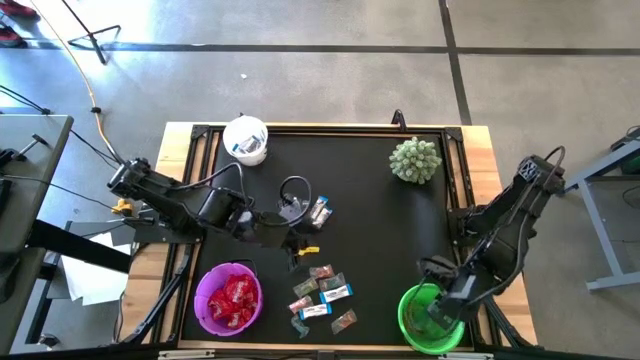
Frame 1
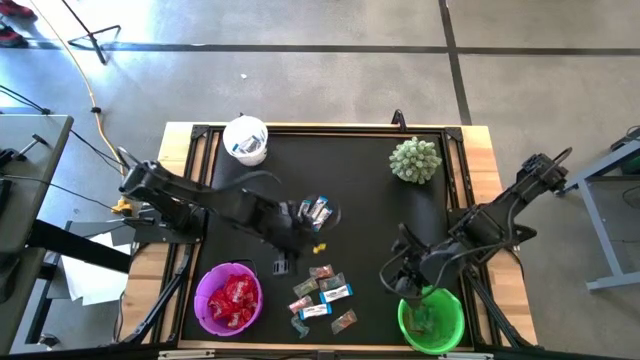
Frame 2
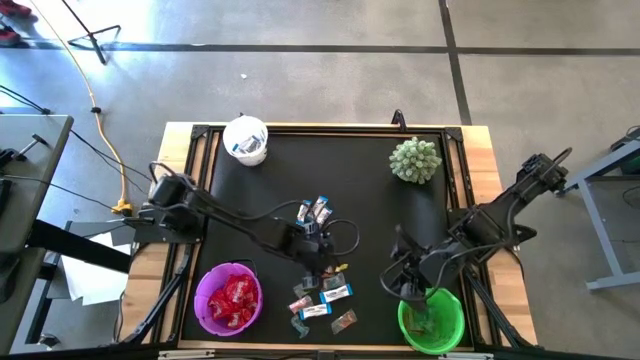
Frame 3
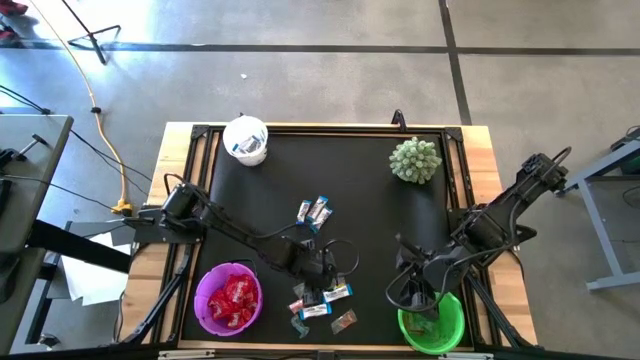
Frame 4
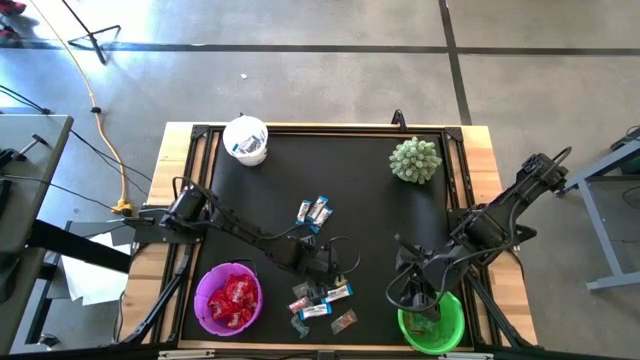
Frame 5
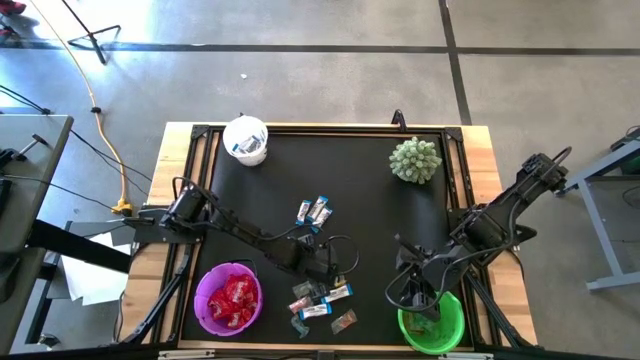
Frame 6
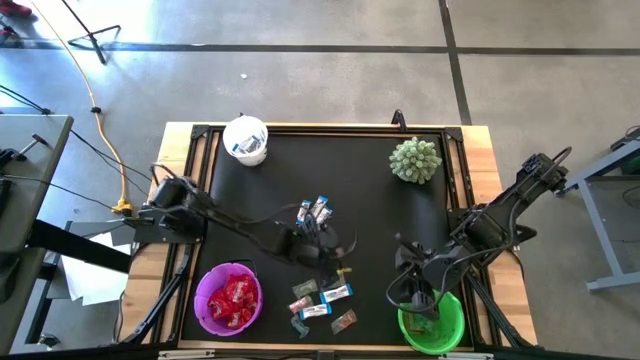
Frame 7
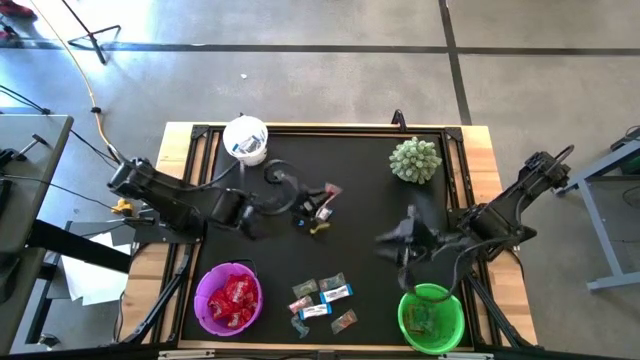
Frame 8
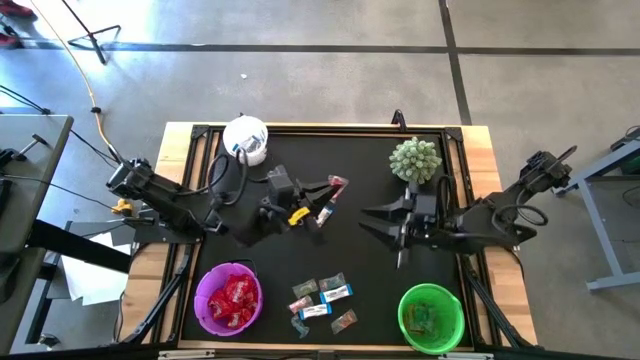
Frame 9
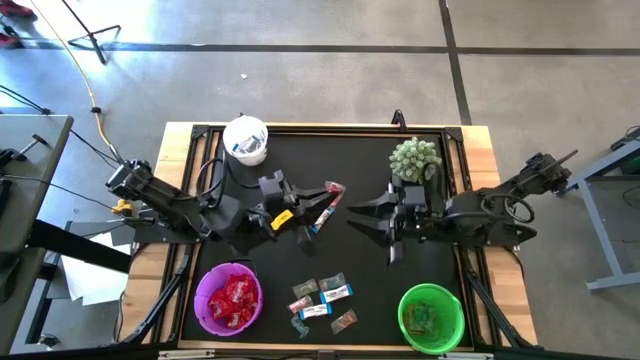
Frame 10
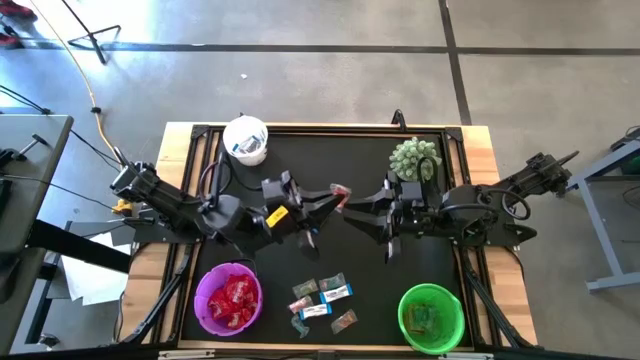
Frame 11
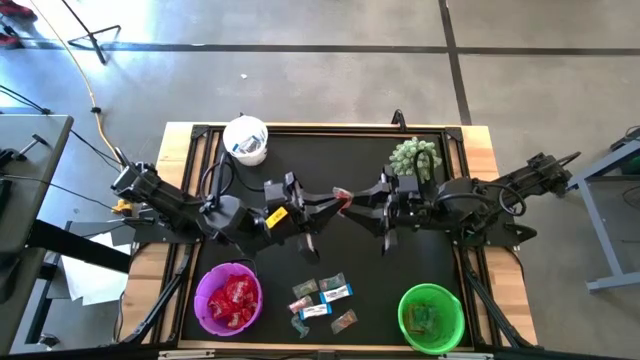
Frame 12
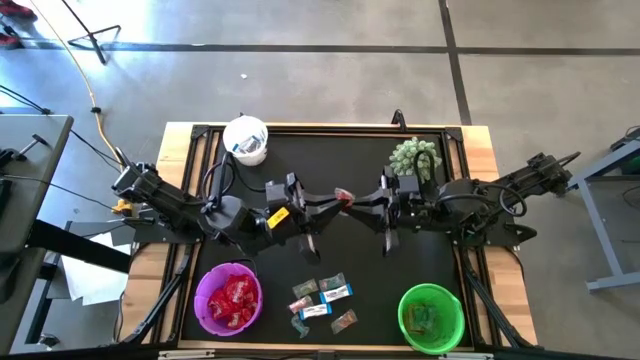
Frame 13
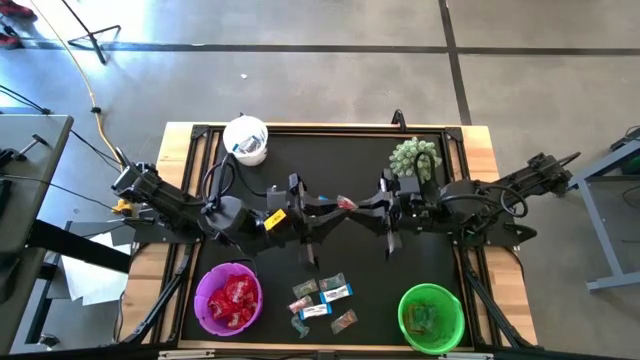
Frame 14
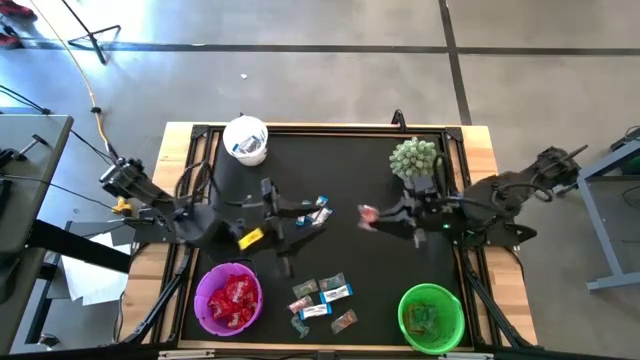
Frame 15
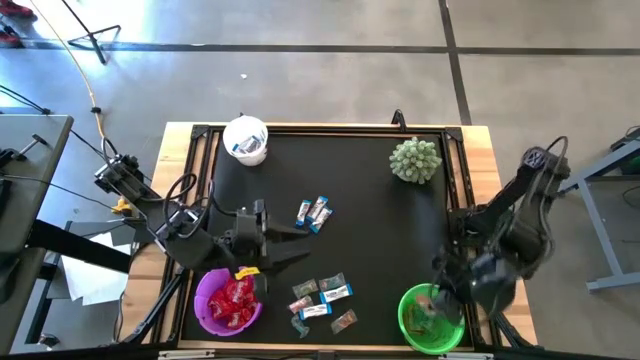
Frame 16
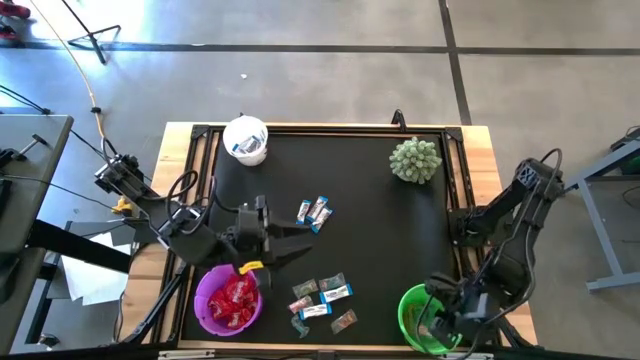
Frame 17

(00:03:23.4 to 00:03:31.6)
Task: Sort candy
Put the orange gummy into the green bucket

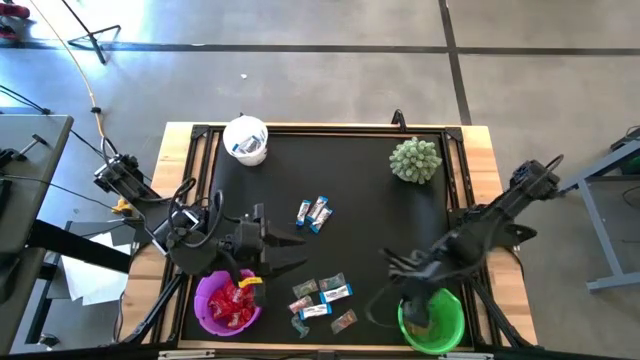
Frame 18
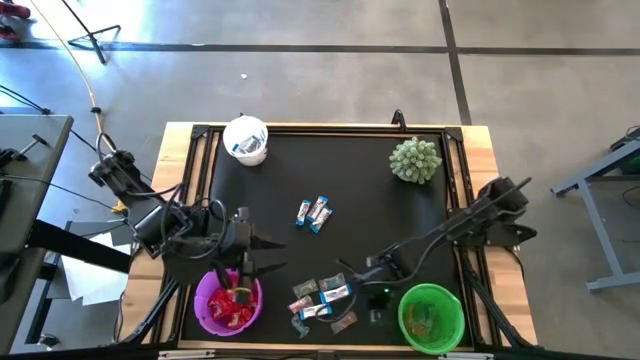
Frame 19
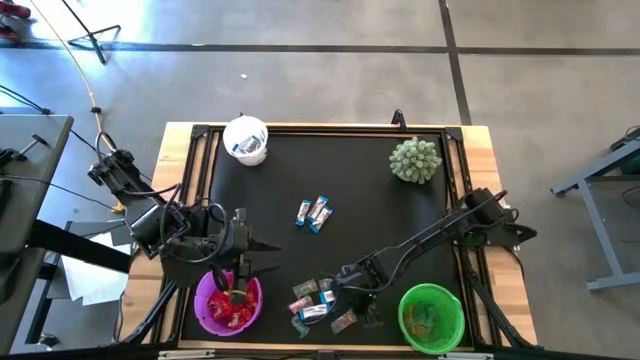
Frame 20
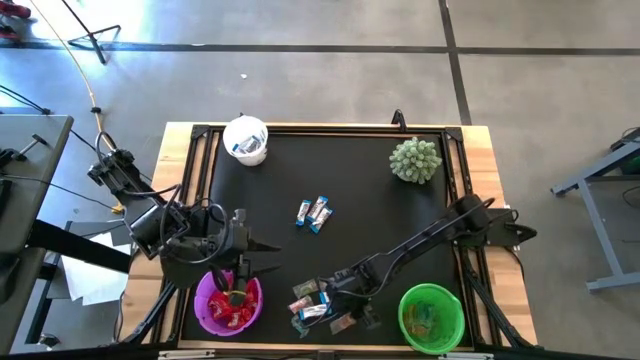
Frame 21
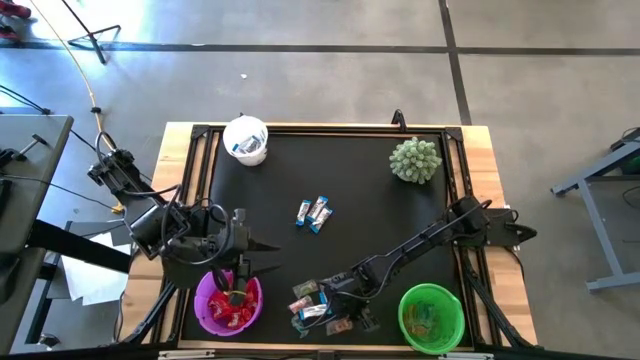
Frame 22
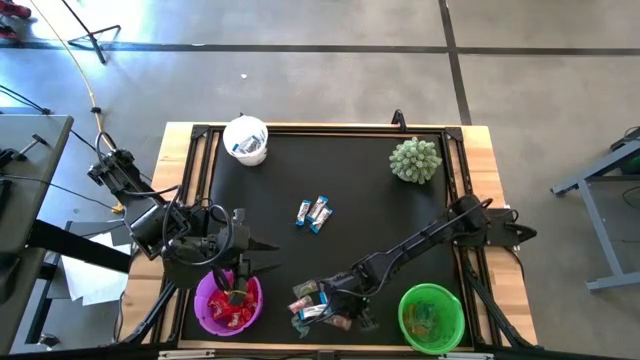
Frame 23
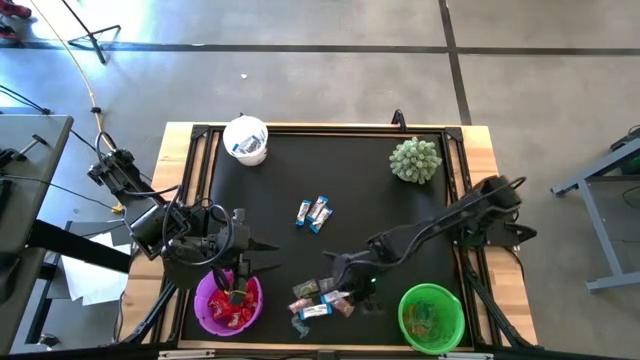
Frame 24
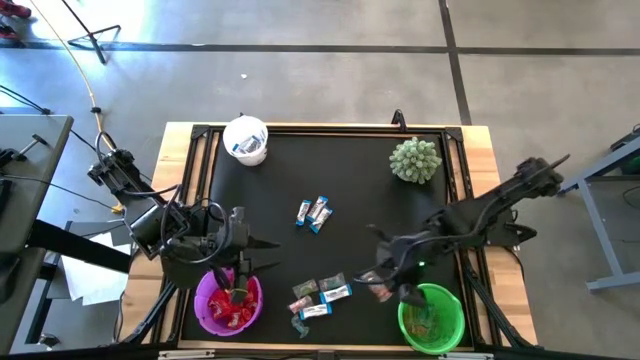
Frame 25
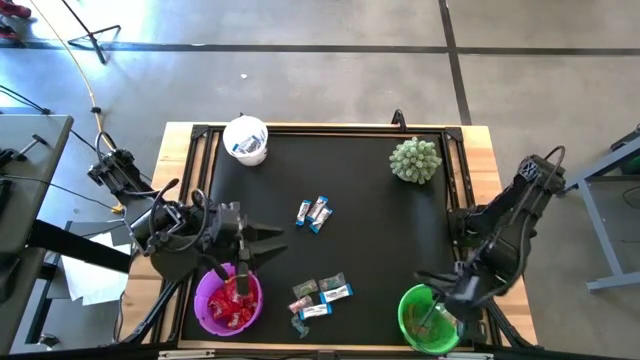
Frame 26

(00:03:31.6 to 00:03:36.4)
Put the orange gummy into the green bucket

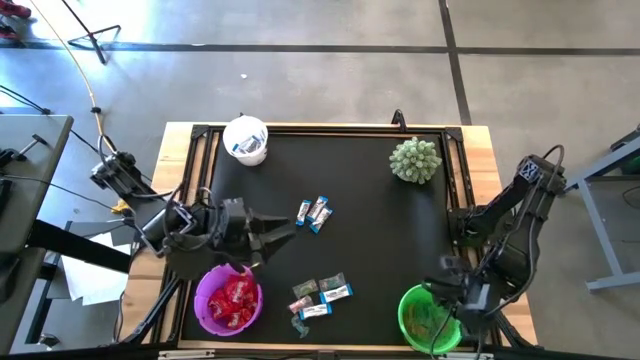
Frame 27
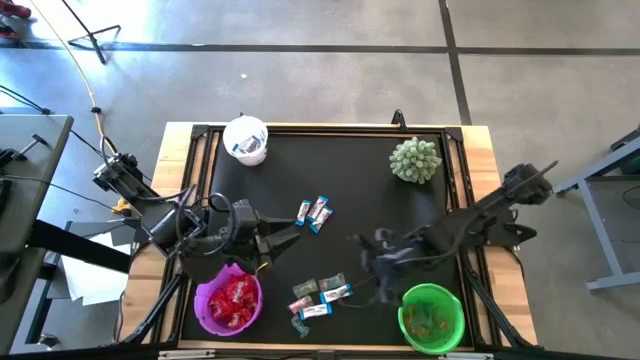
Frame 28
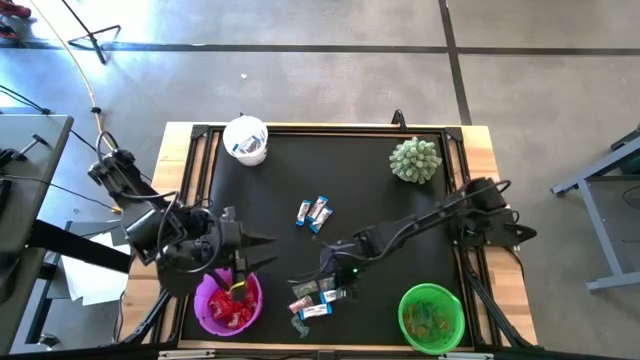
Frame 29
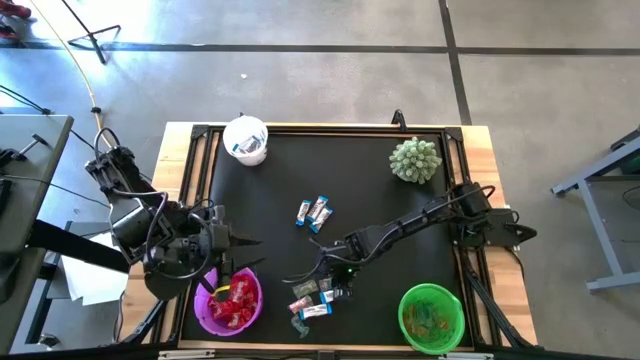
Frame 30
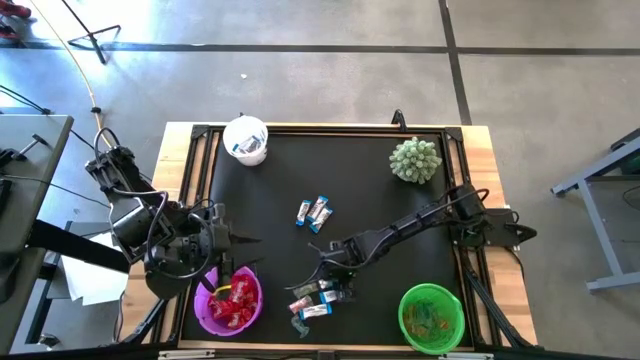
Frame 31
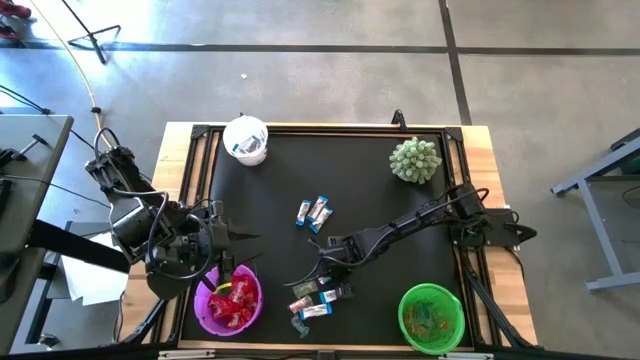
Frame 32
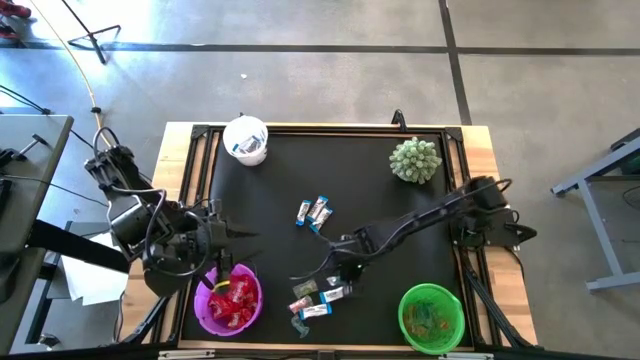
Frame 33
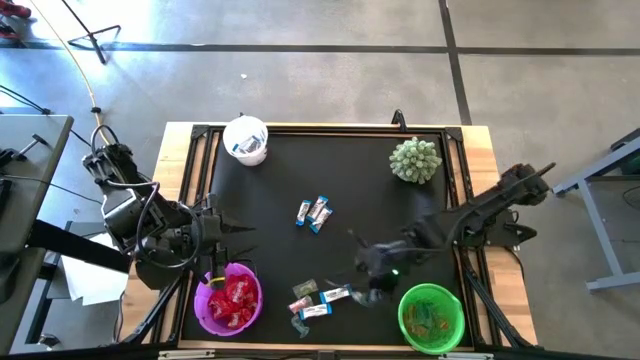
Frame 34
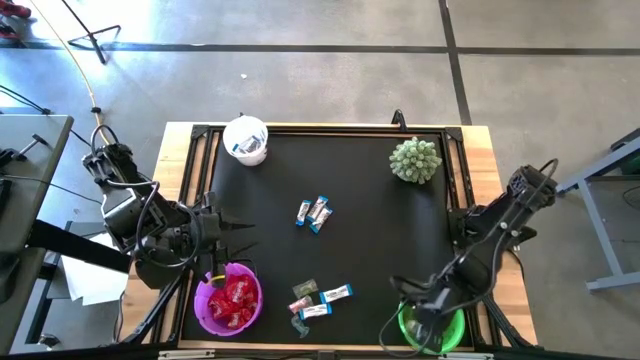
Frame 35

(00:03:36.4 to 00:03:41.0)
Put the blue gummy into the green bucket

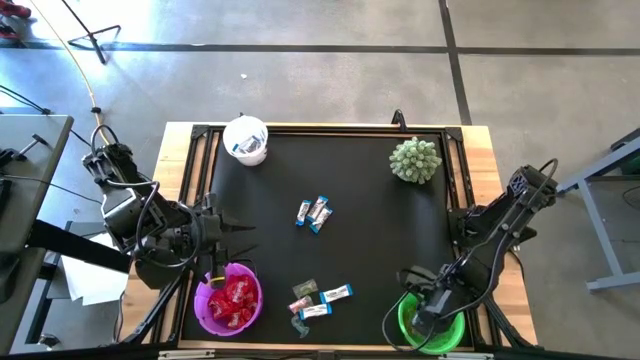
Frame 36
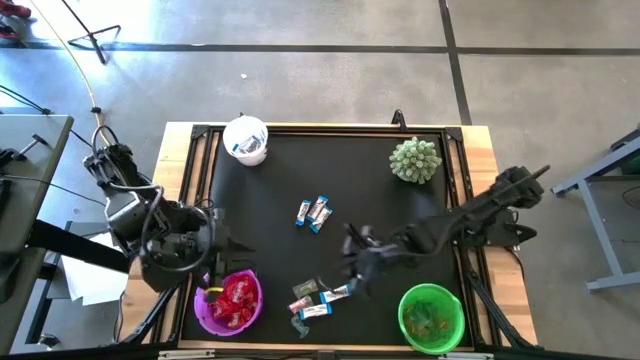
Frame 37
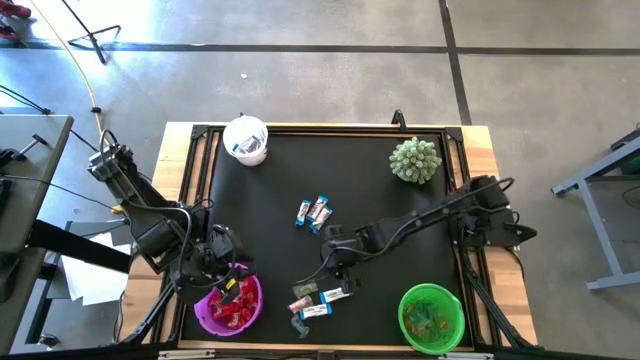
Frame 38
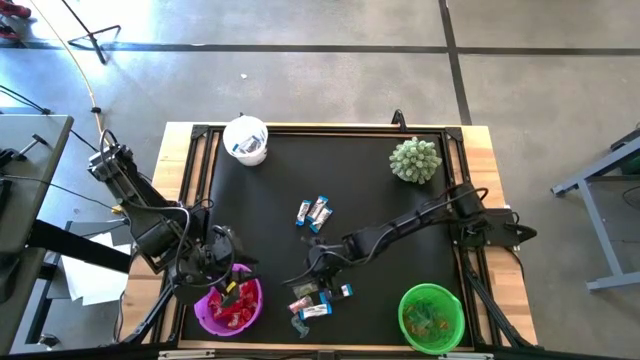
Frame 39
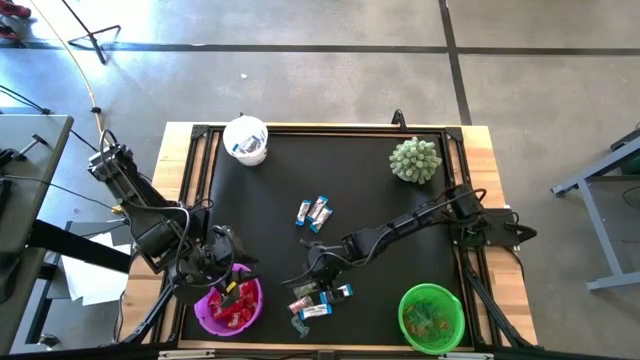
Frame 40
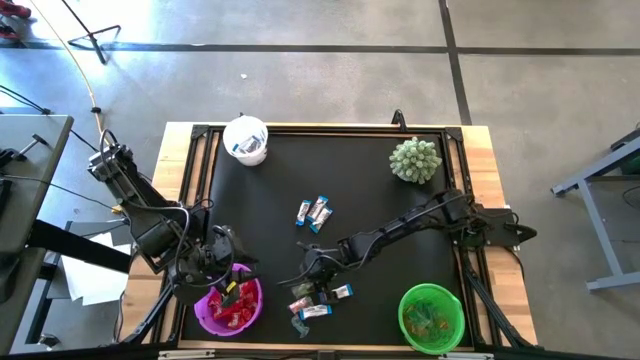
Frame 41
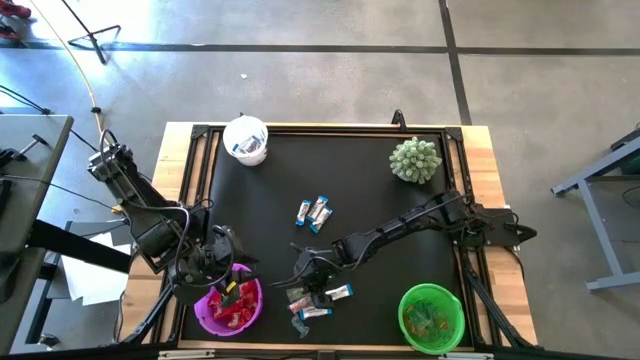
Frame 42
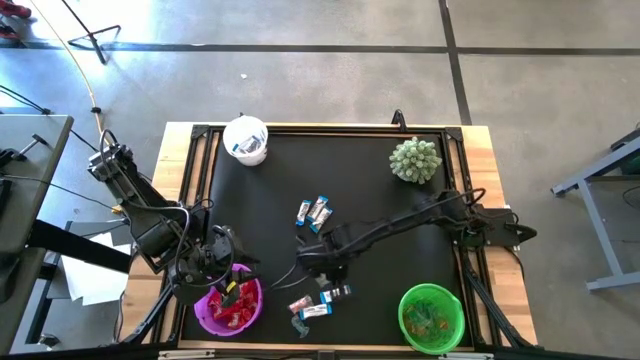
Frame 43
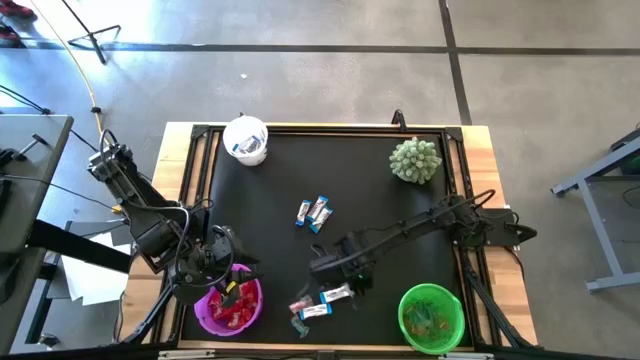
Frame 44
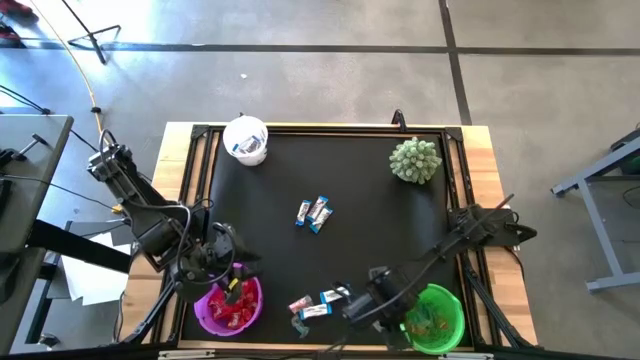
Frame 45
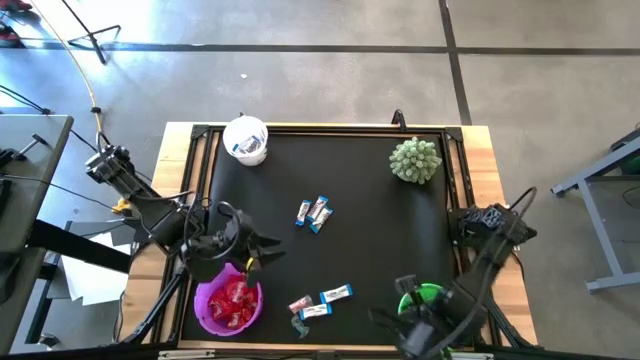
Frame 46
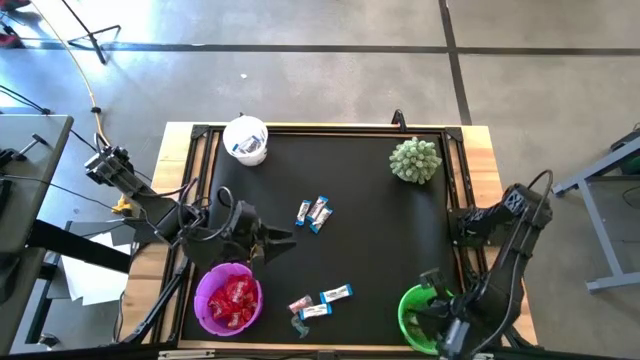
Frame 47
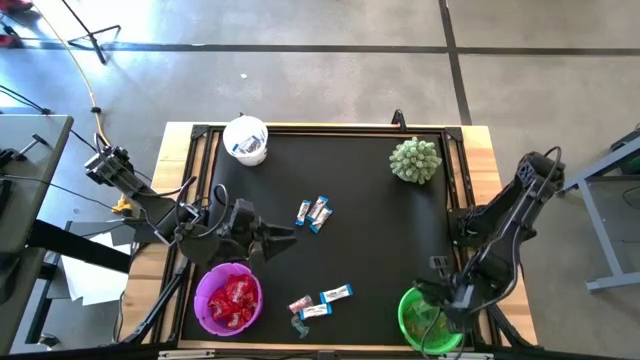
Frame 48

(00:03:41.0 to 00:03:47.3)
Put the green gummy into the green bucket
